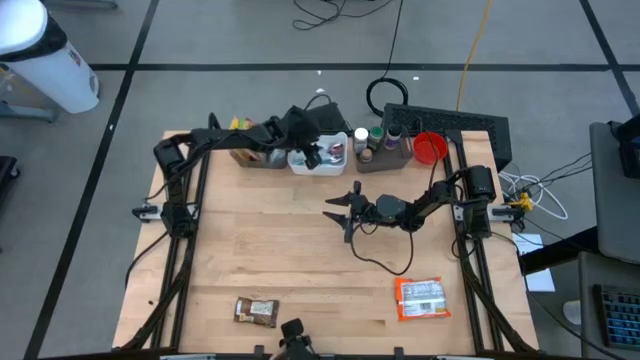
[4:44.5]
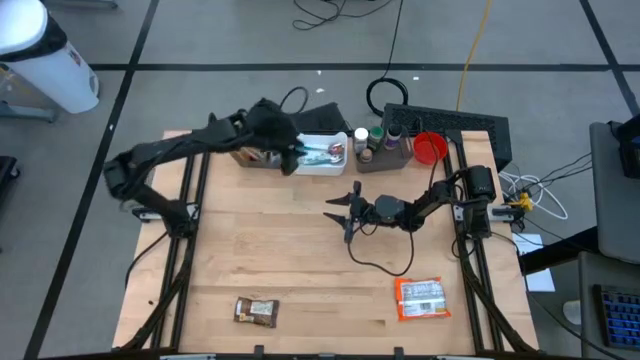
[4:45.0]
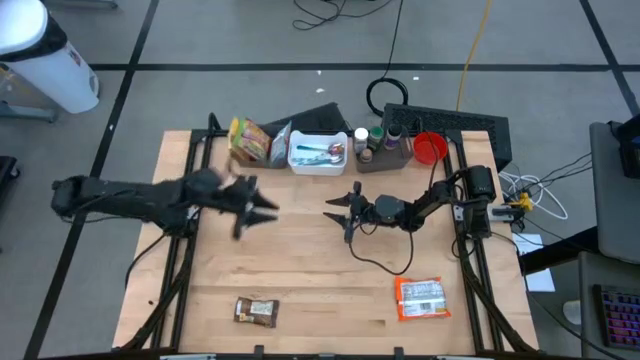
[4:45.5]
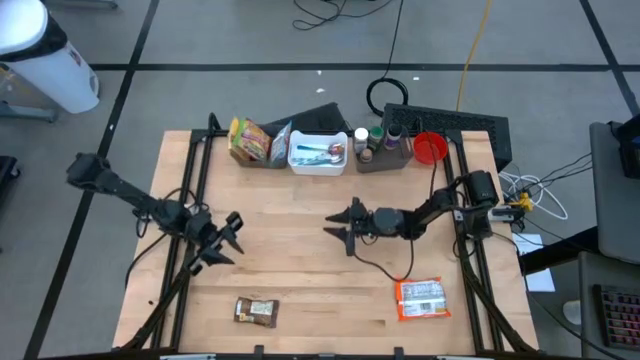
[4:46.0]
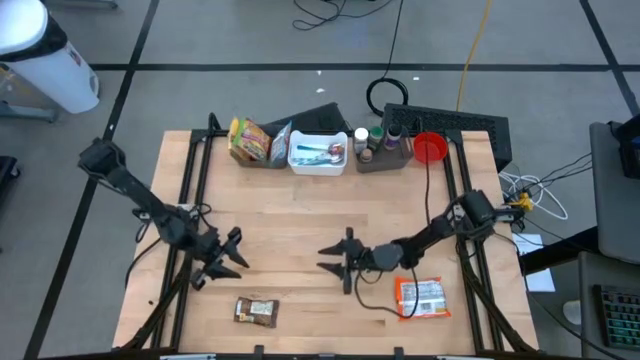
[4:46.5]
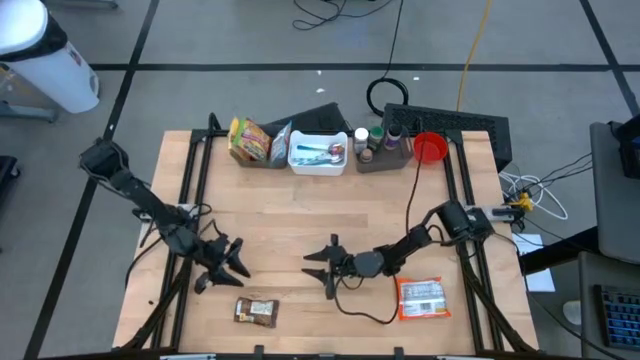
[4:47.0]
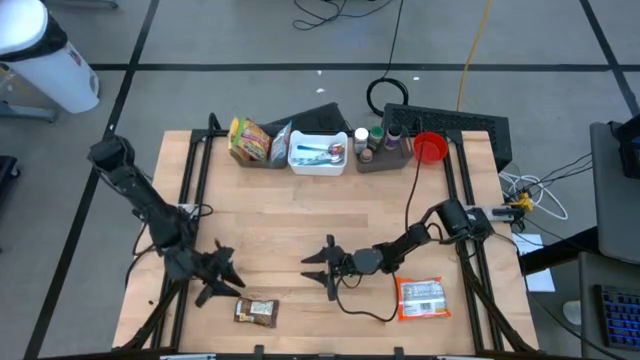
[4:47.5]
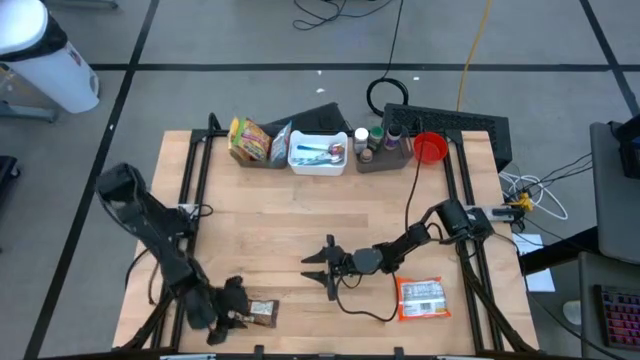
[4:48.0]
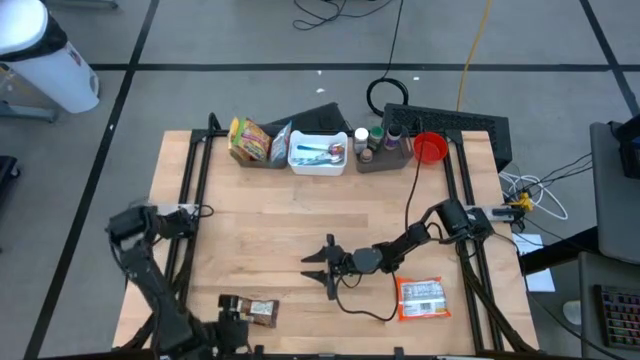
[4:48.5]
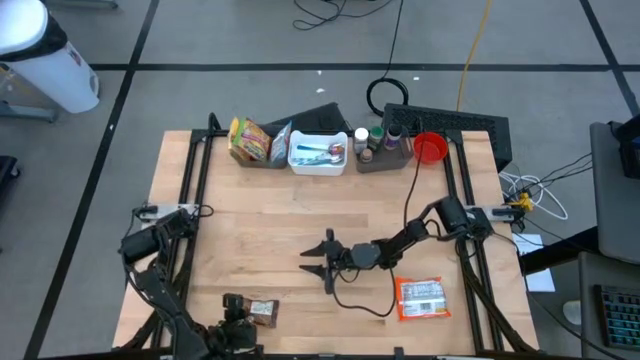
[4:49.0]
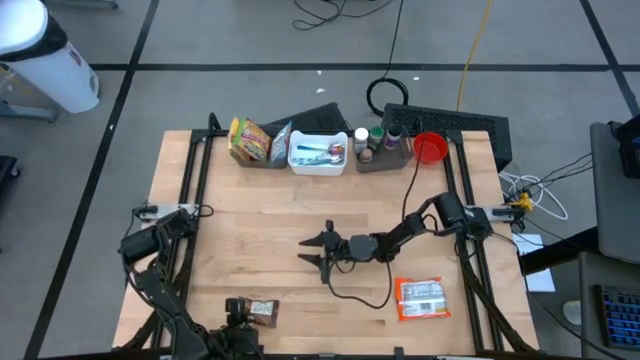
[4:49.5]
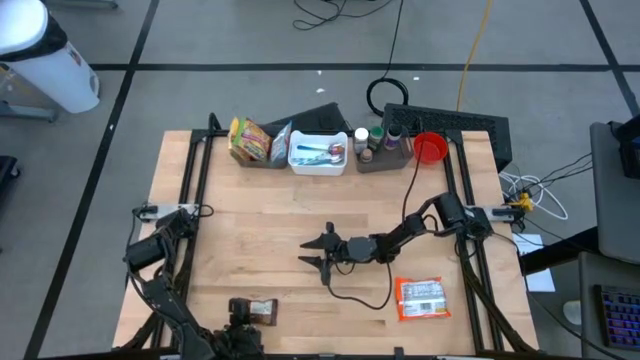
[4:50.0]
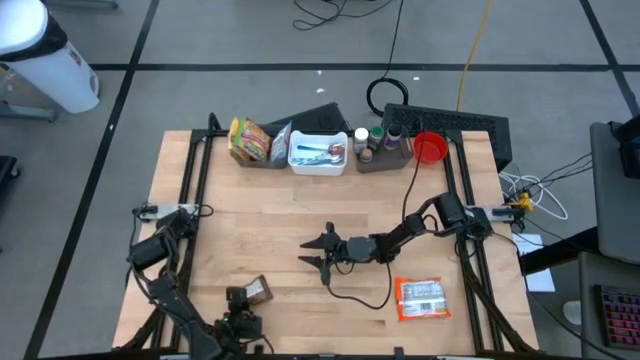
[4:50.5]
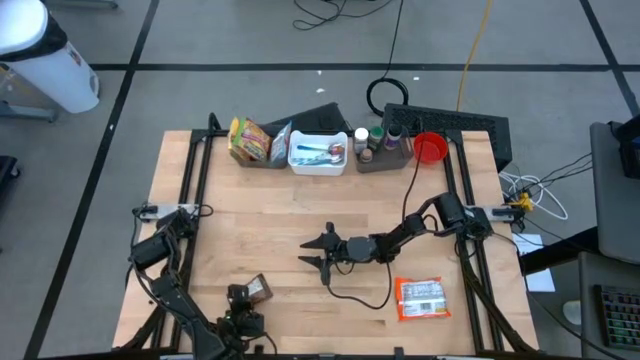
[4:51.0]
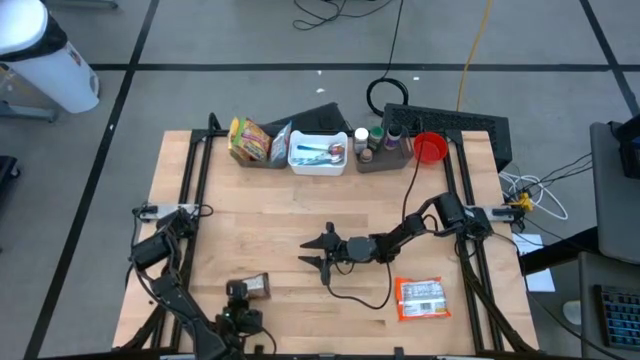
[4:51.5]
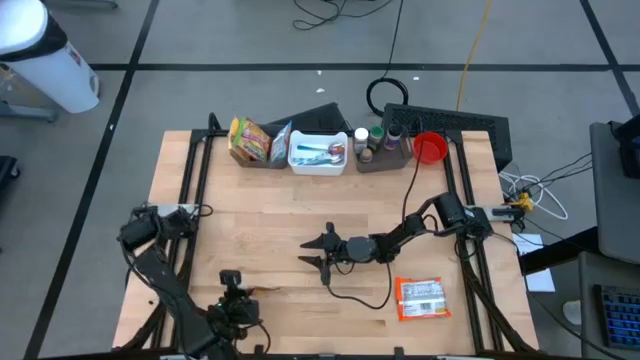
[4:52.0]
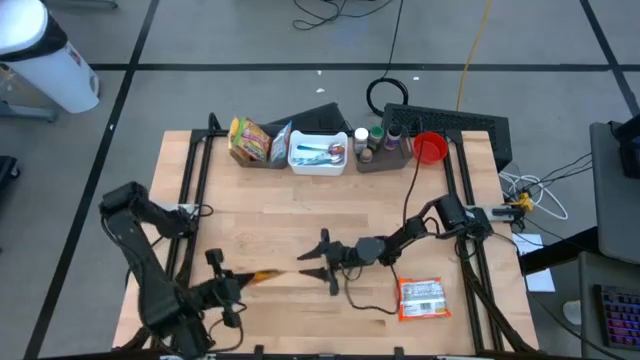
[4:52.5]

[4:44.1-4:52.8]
Task: Pick & Place Food Item
Put the orange seasoning bag into the right black bin

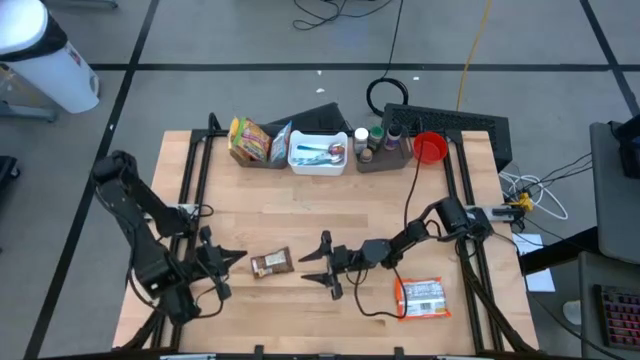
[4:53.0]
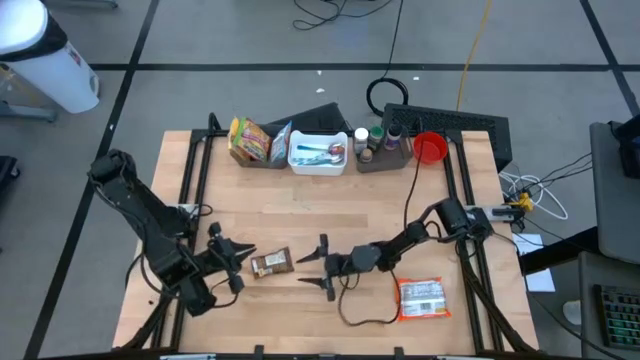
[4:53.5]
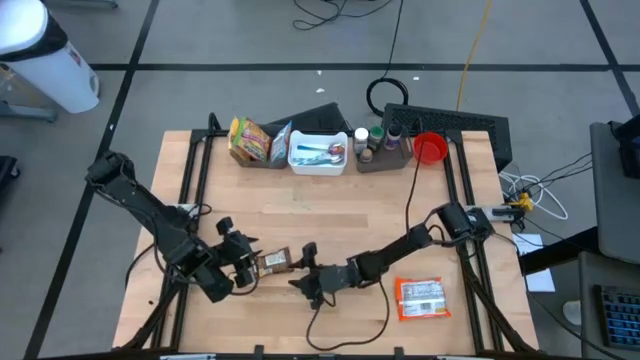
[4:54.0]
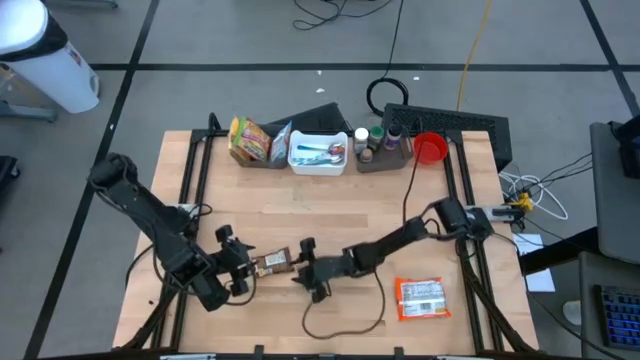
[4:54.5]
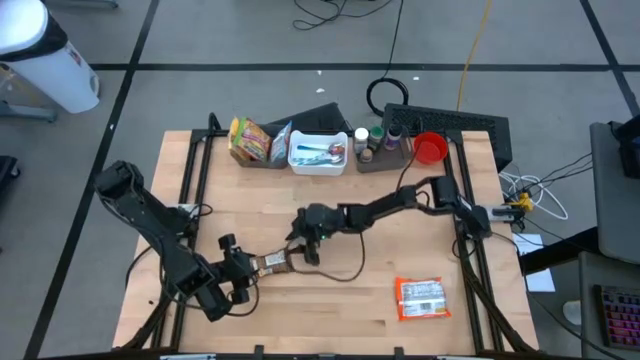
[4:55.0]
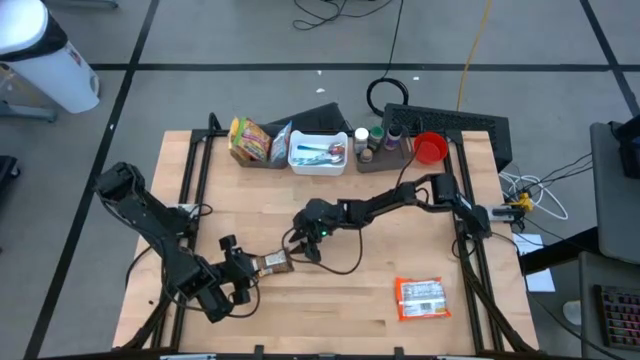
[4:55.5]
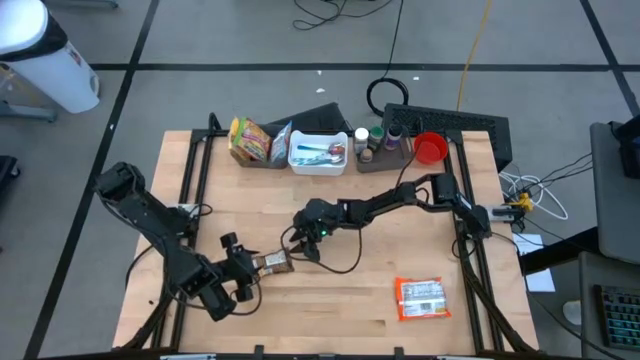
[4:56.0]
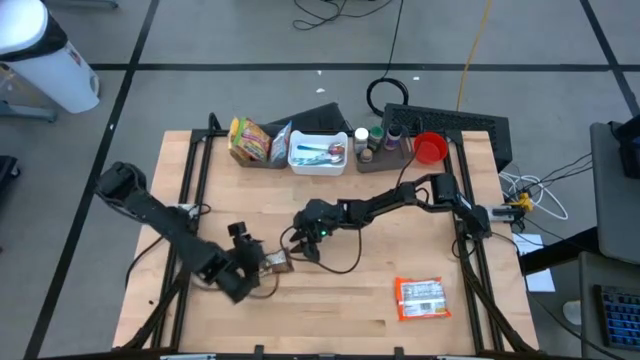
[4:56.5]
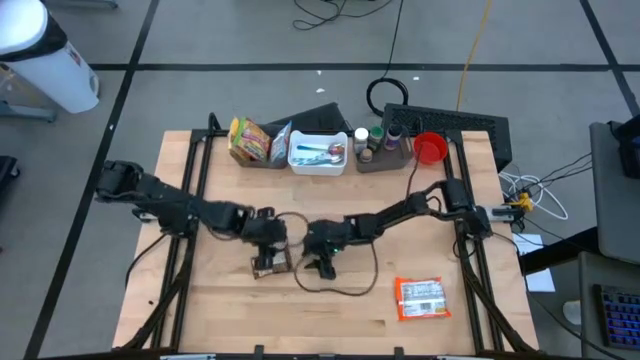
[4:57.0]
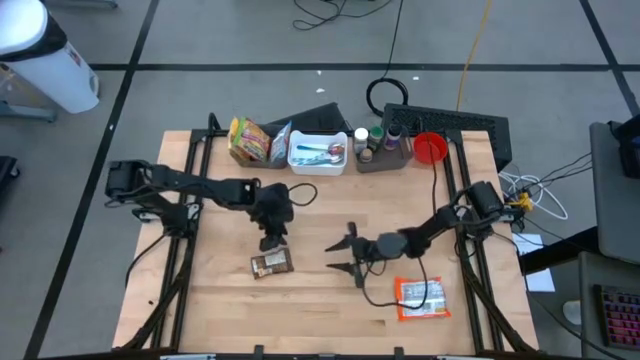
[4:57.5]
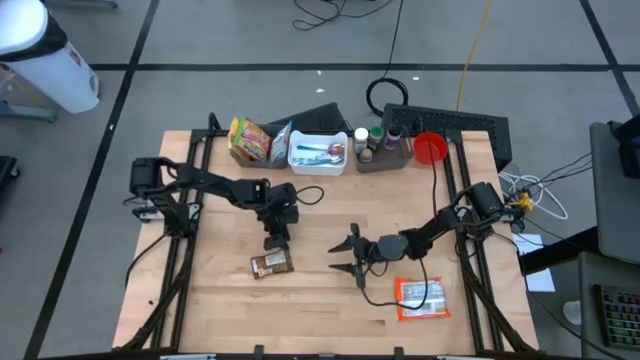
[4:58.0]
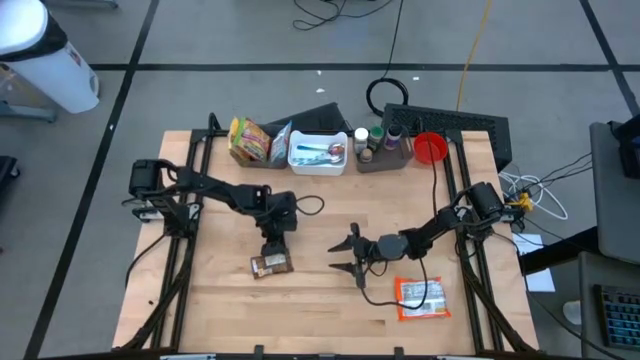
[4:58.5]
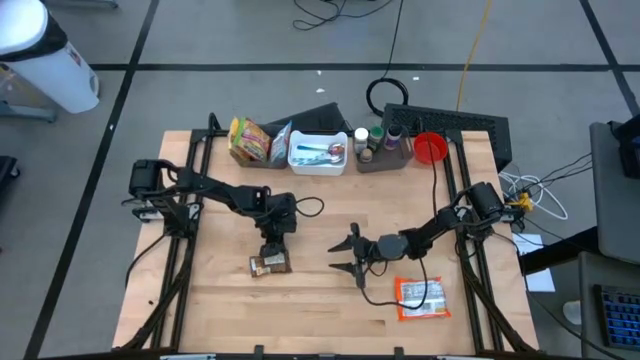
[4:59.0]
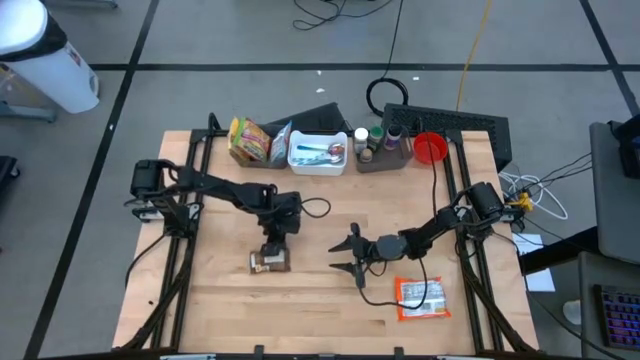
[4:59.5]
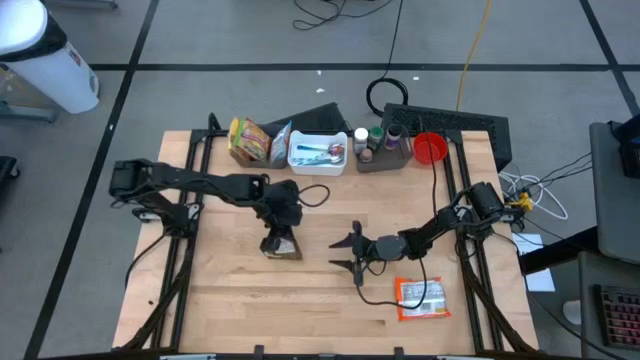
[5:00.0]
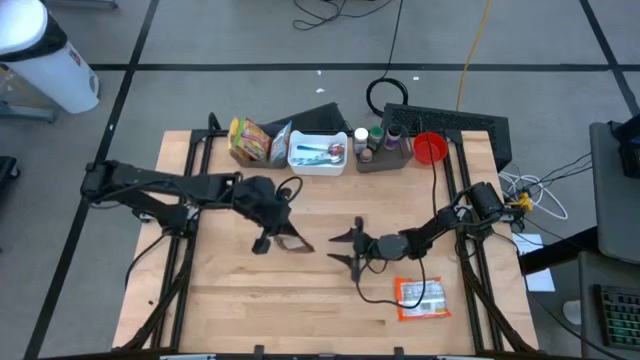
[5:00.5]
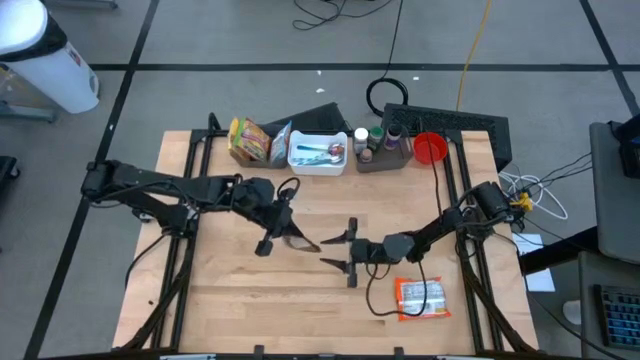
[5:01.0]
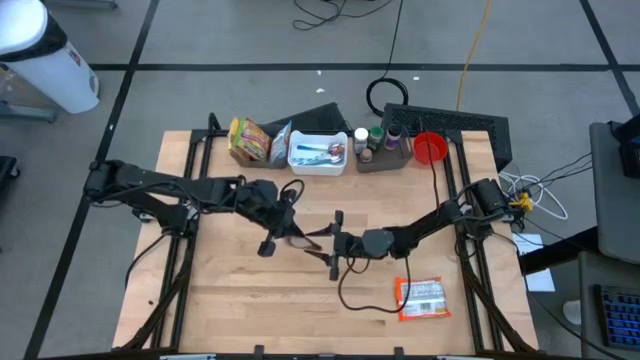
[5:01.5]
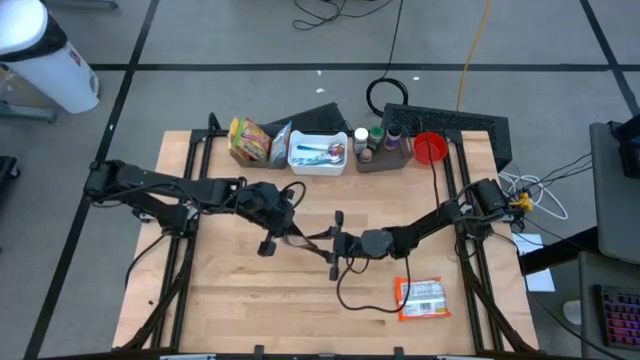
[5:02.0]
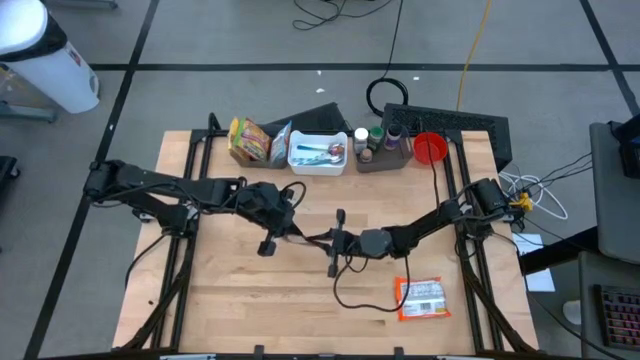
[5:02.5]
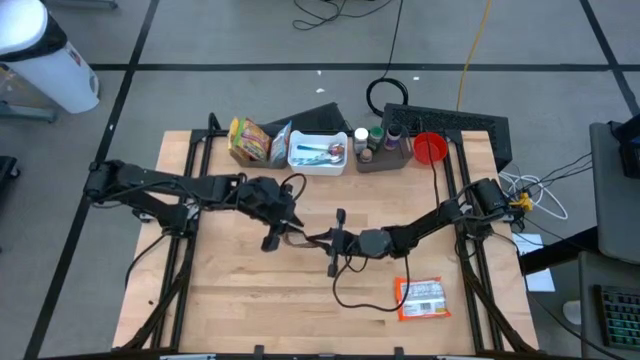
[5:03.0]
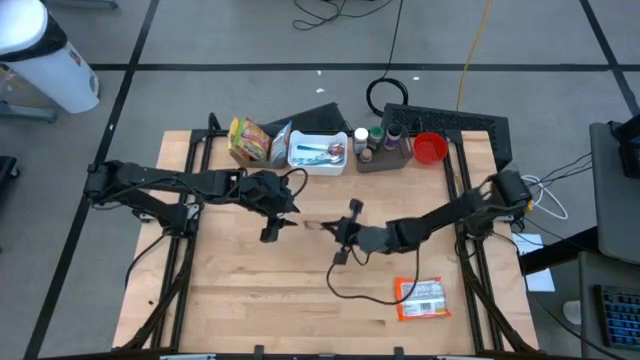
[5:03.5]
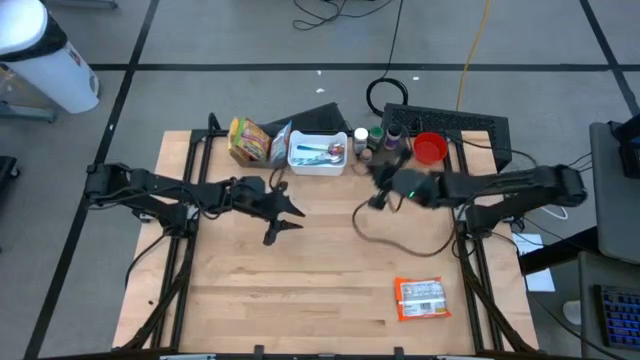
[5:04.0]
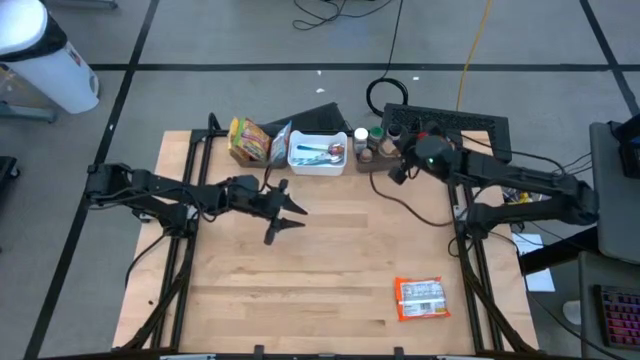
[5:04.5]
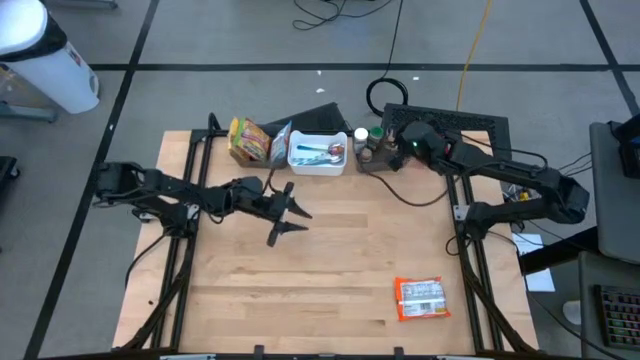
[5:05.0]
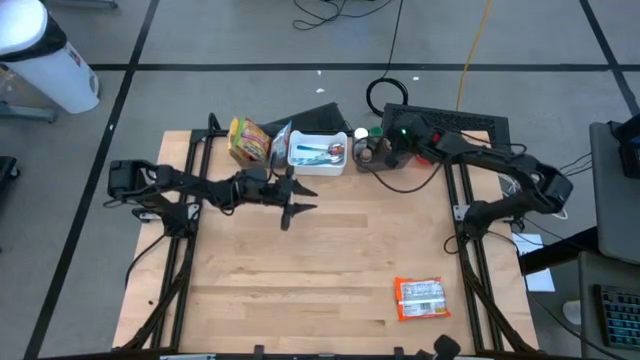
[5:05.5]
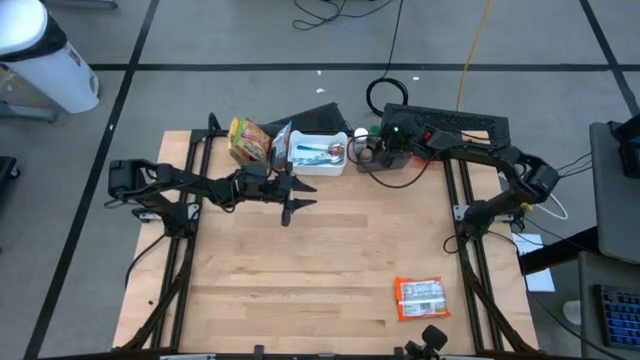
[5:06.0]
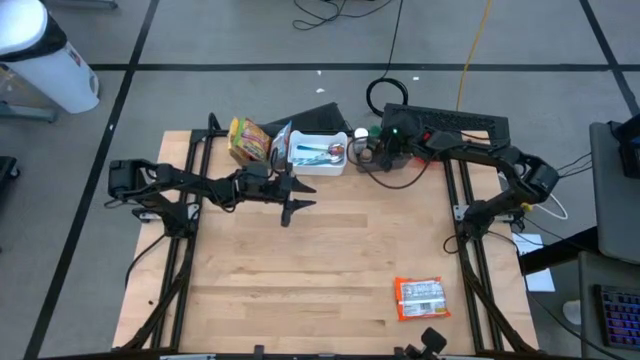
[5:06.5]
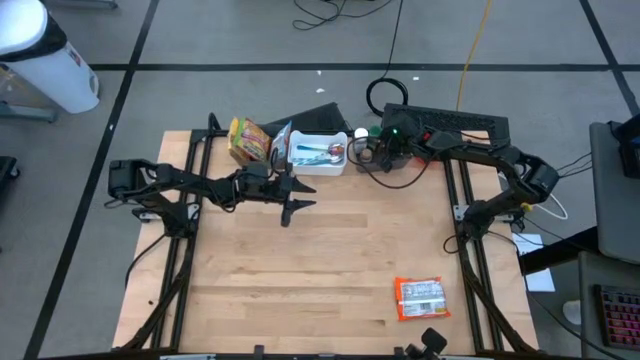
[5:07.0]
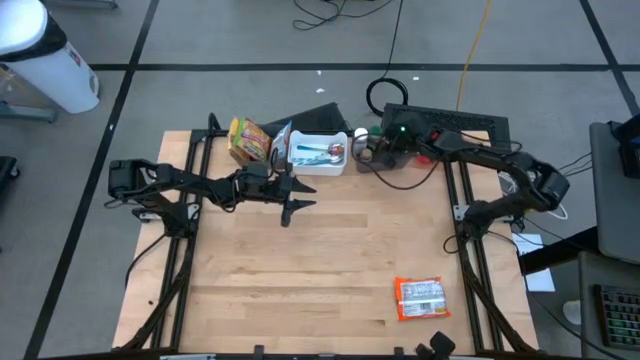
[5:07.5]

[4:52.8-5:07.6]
Put the orange seasoning bag into the right black bin
